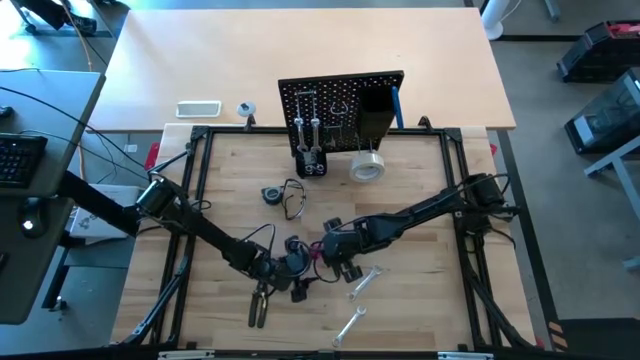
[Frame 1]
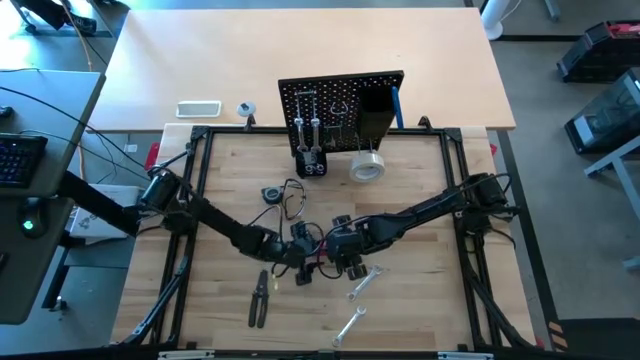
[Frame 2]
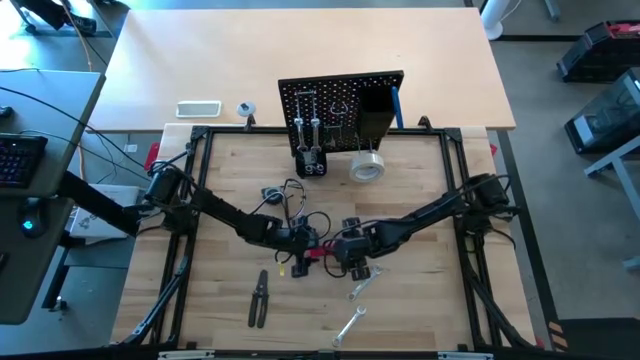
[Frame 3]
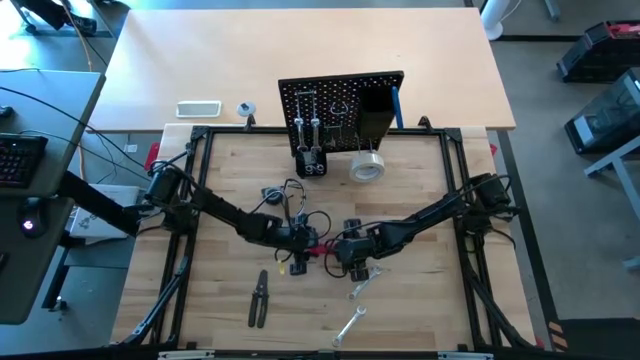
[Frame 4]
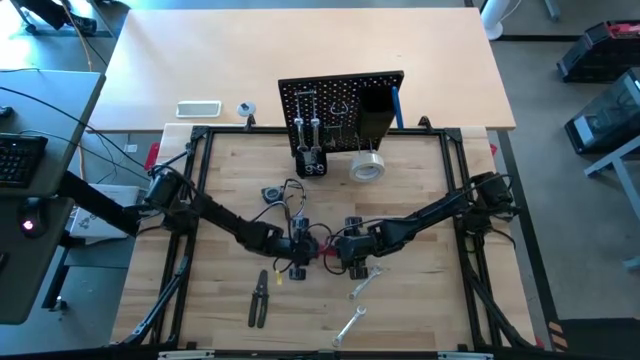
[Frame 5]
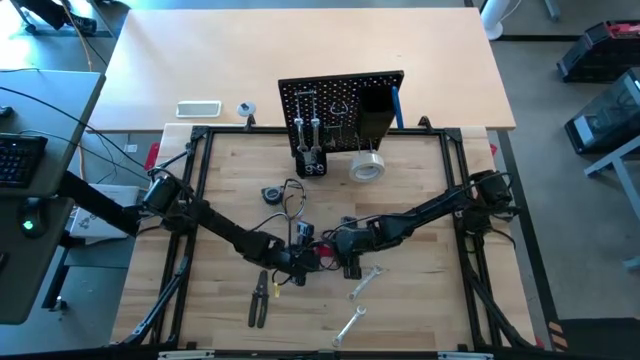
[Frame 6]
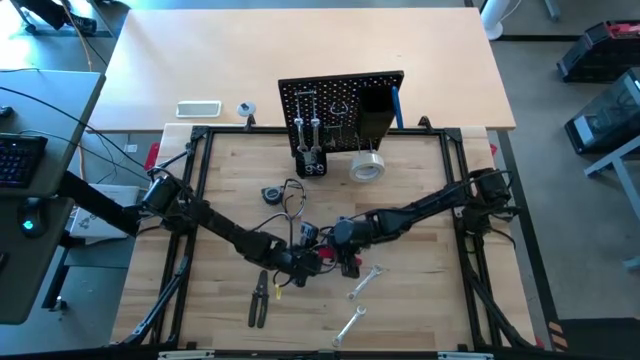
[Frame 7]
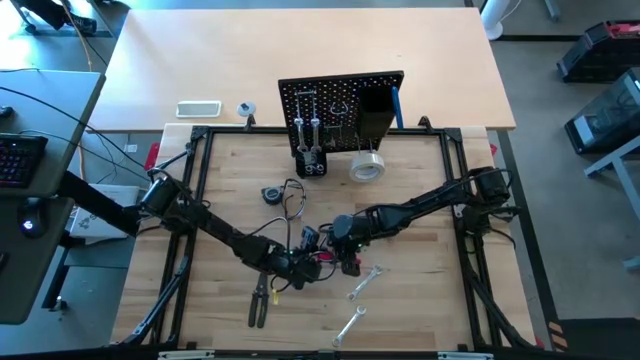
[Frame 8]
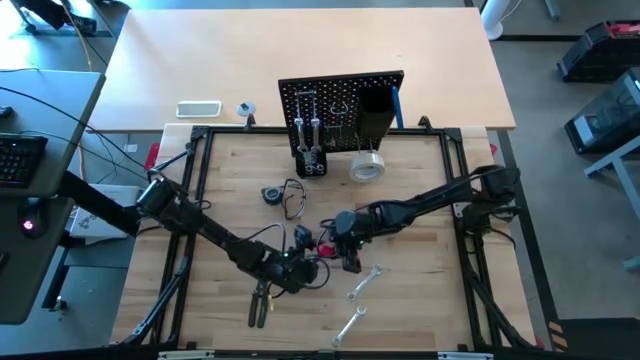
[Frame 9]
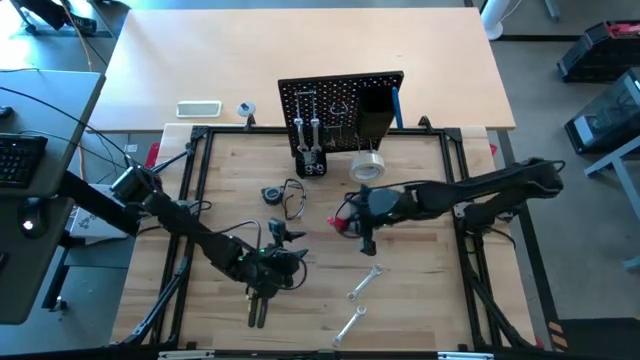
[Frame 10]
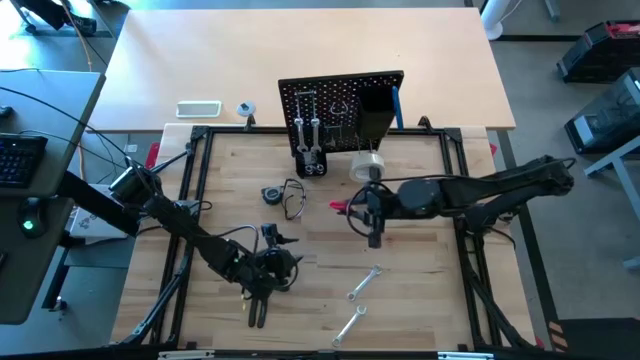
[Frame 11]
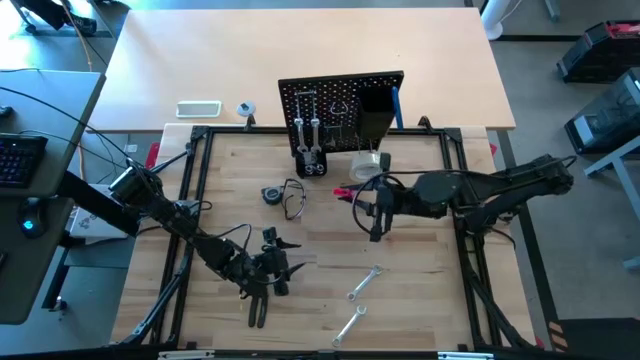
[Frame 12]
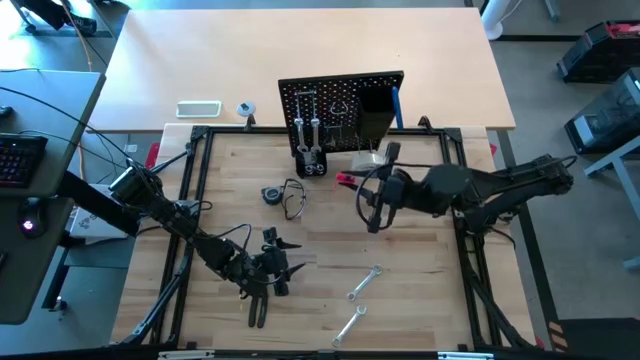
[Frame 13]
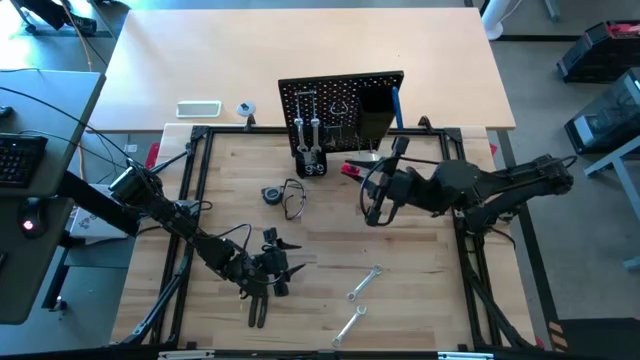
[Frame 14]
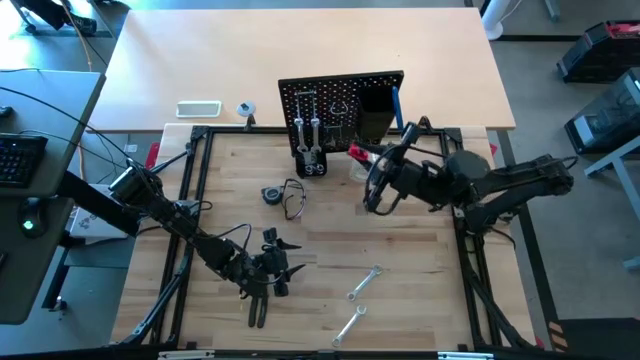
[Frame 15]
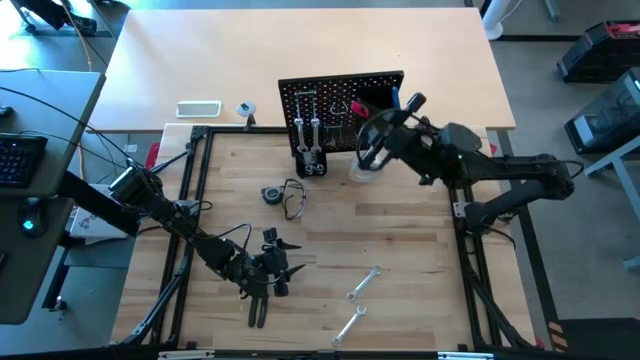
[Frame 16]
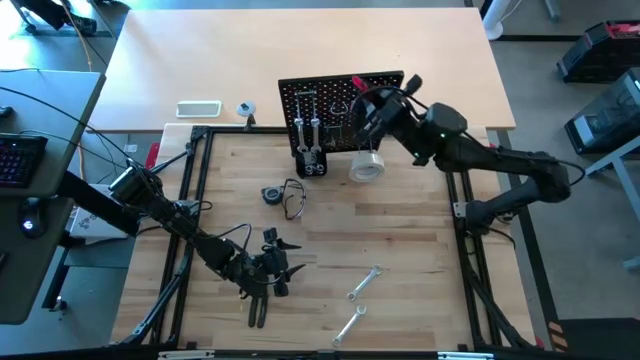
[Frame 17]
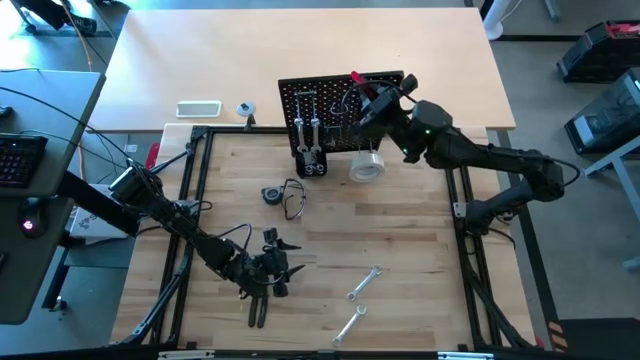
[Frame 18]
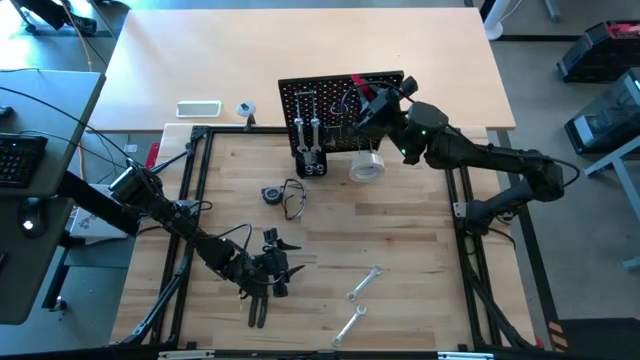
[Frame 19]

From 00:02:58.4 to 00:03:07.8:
Task: Hang tools onto peg board
Put the red cutter into the top black bin on the peg board

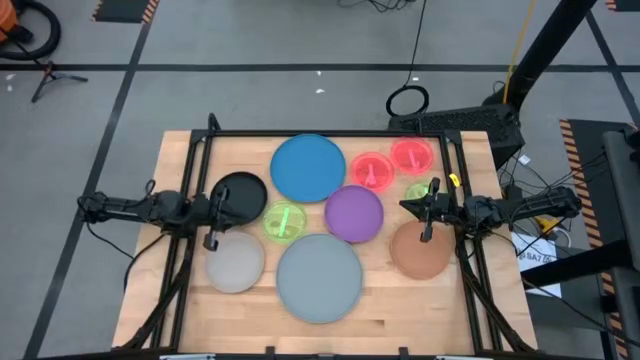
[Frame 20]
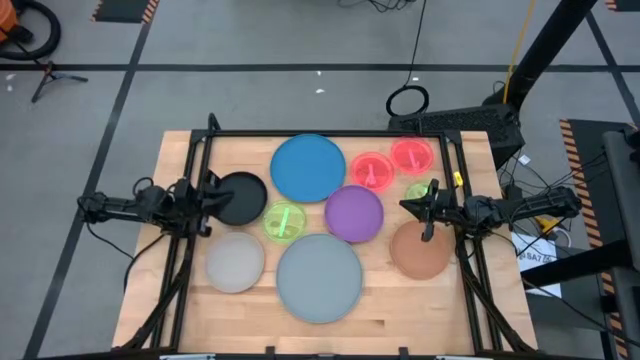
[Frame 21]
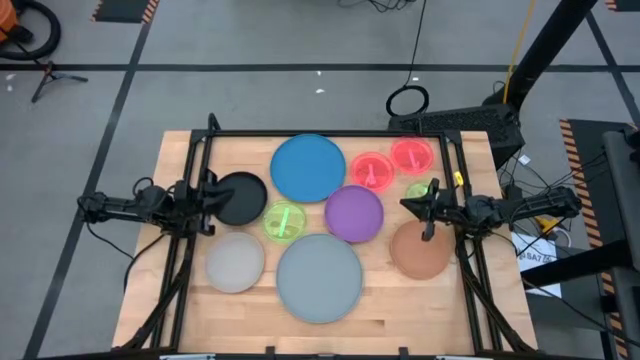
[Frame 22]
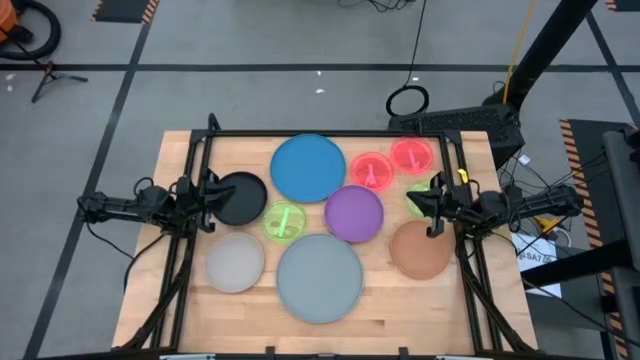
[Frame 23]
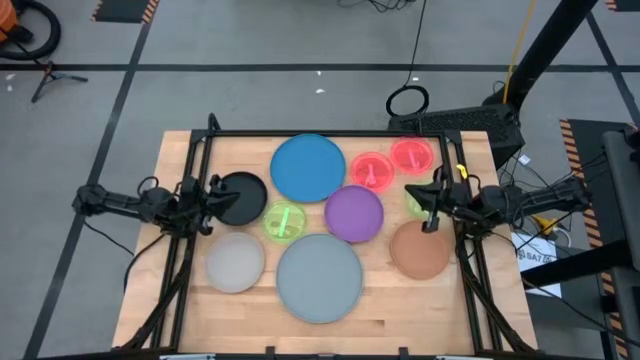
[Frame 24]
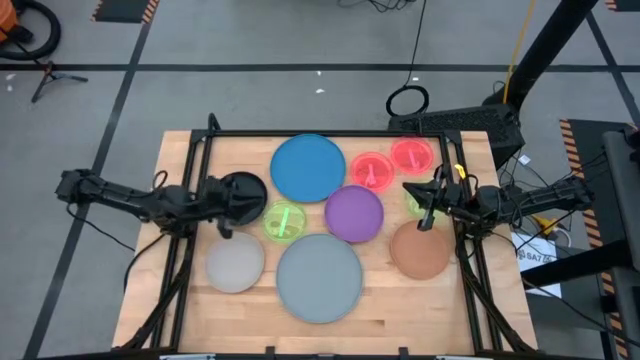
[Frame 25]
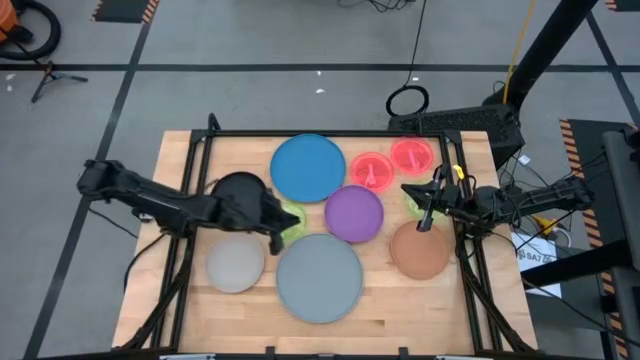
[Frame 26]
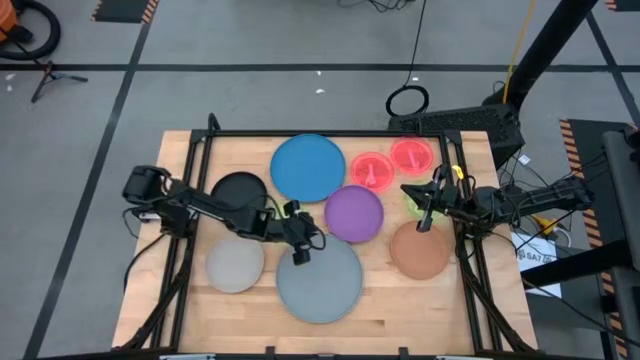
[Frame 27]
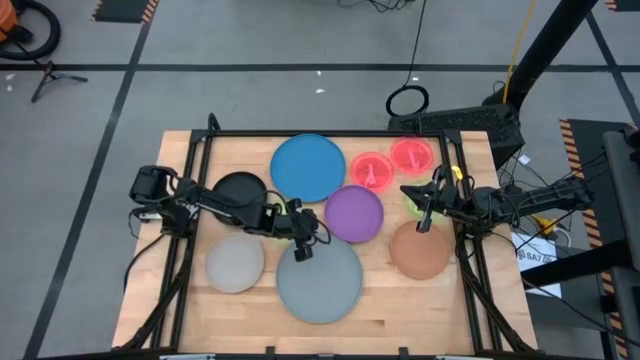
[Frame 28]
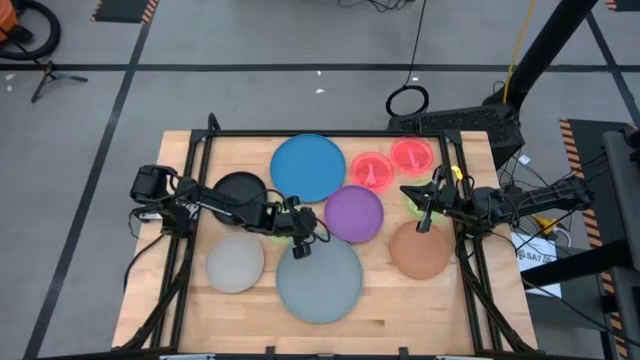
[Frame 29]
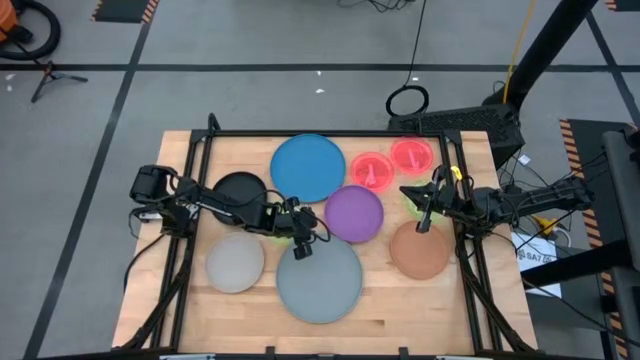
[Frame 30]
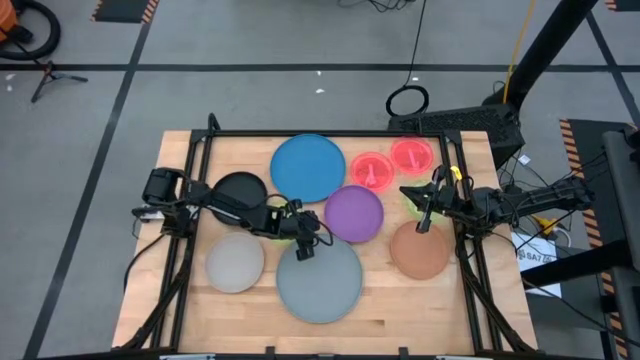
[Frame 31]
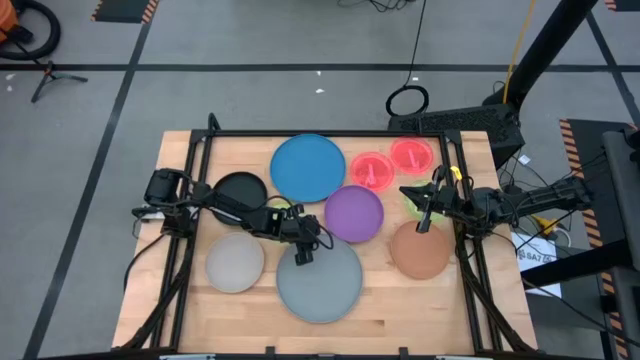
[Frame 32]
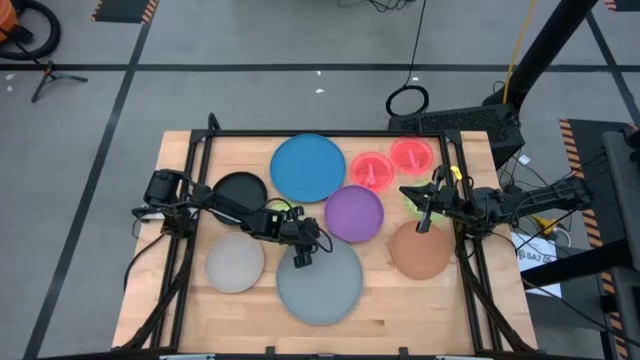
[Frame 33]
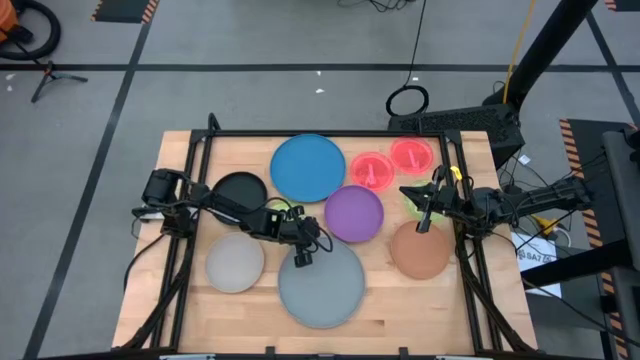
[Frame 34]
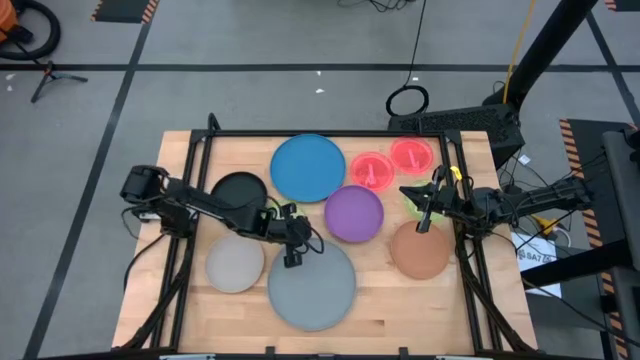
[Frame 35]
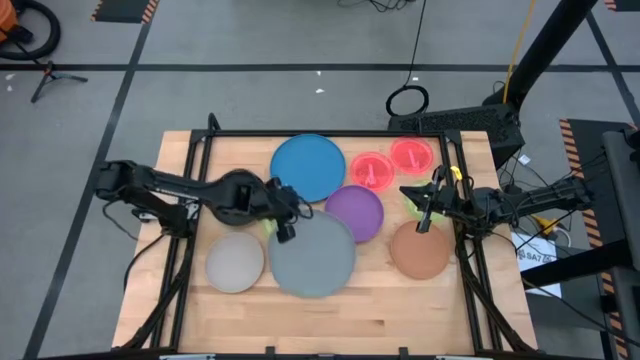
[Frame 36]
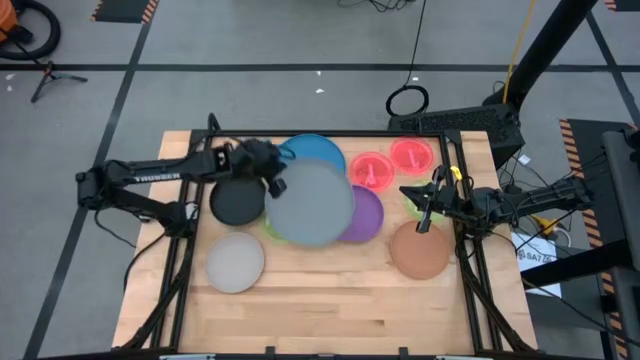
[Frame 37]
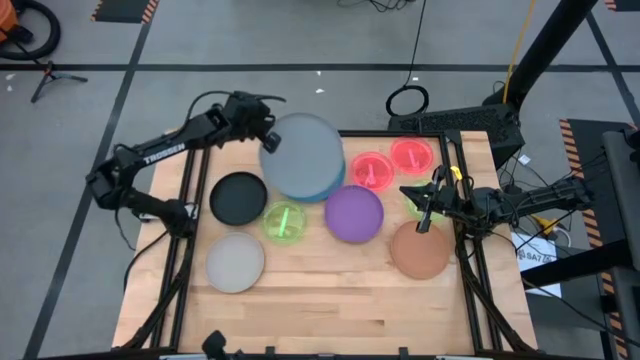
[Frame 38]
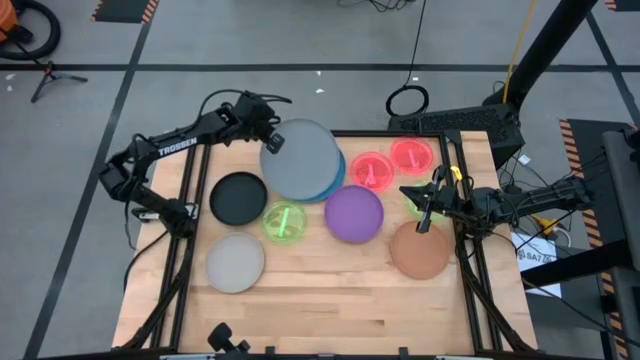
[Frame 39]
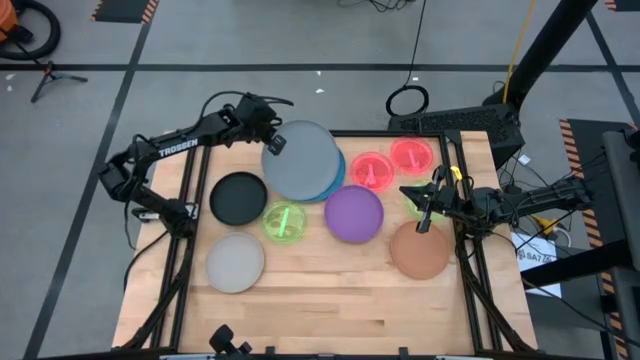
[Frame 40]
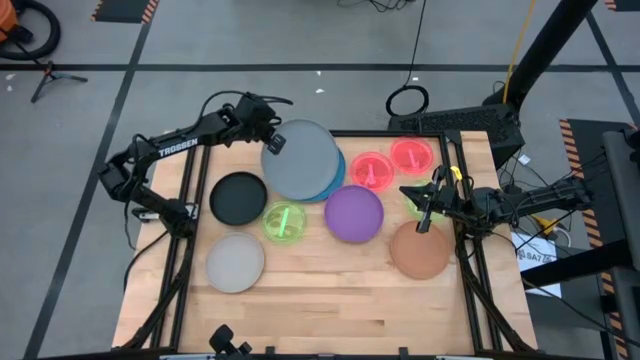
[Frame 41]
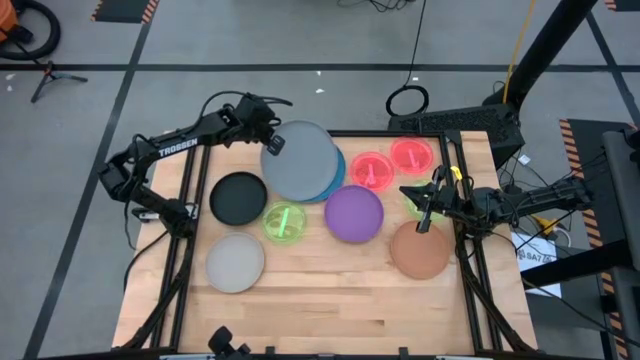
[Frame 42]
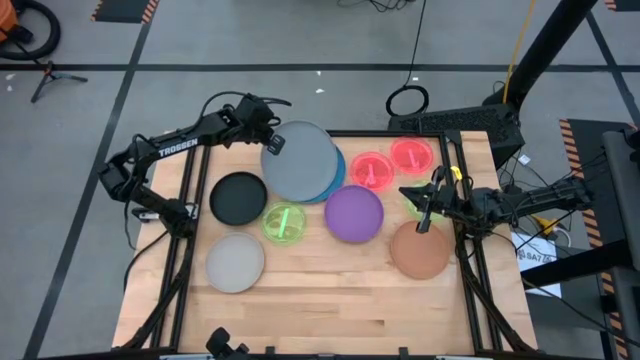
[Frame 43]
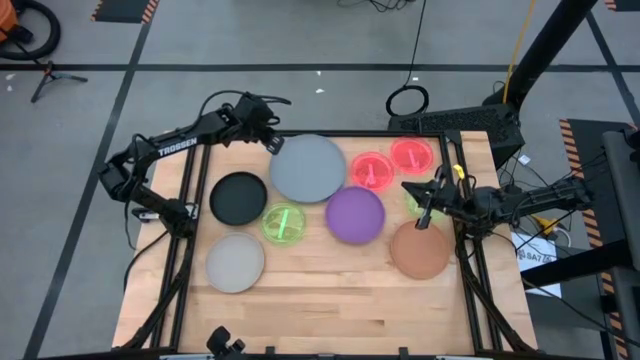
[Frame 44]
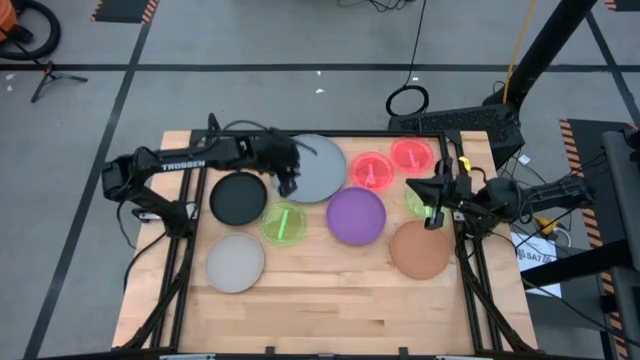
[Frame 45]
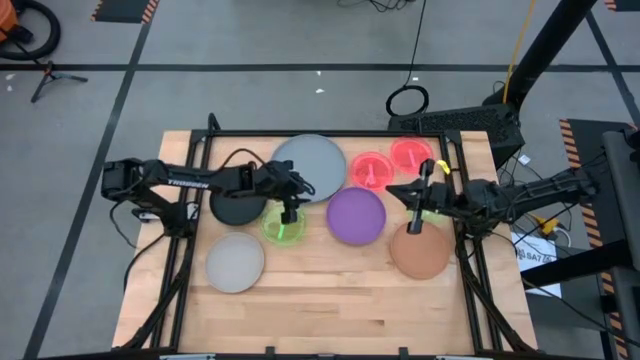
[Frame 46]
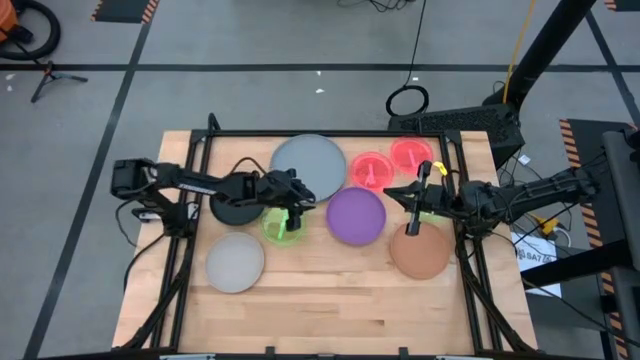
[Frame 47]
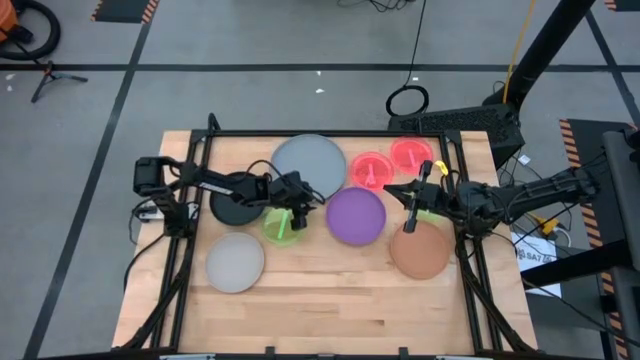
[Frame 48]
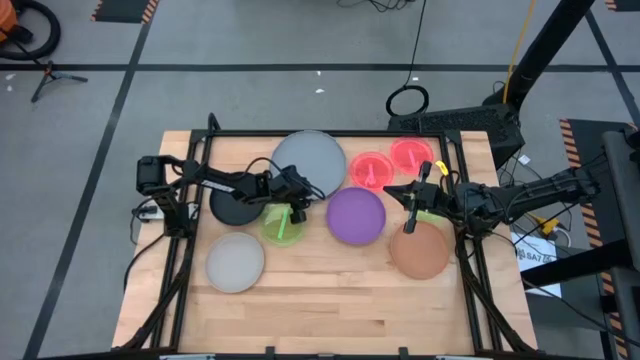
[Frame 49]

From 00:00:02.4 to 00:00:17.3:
Task: Stack plastic plates
Stack the gray plate on top of the blue plate
